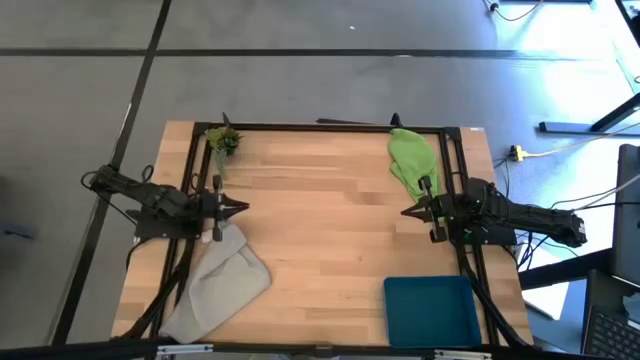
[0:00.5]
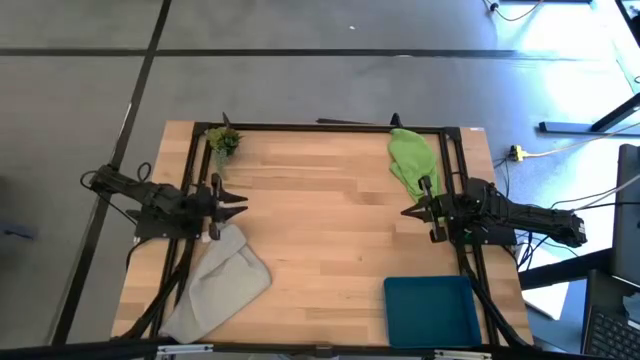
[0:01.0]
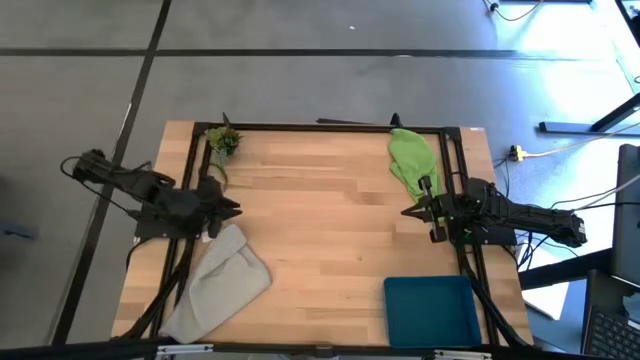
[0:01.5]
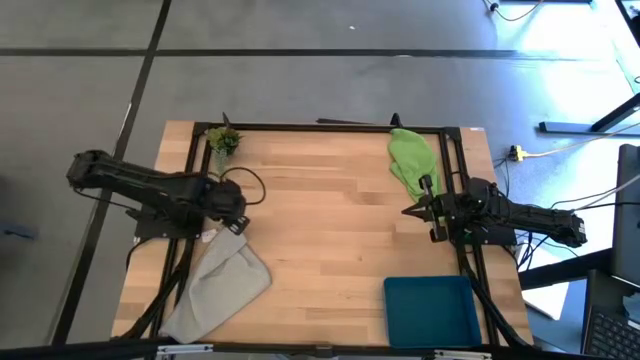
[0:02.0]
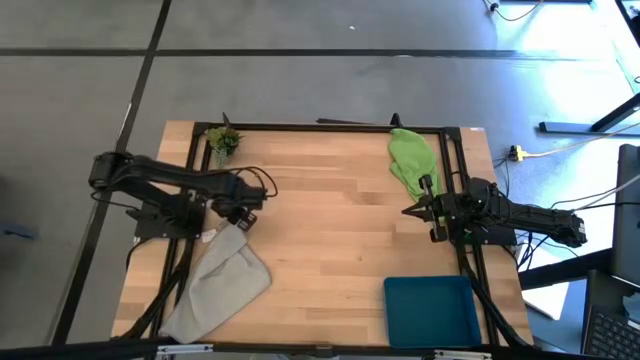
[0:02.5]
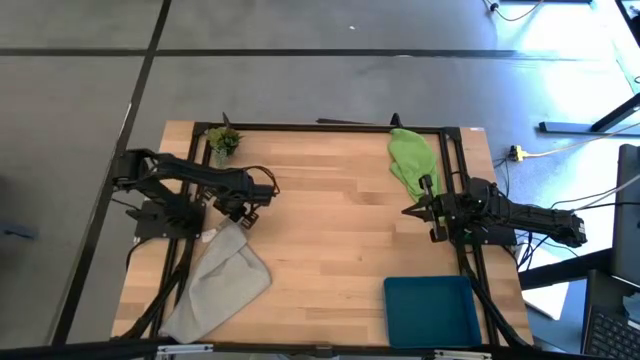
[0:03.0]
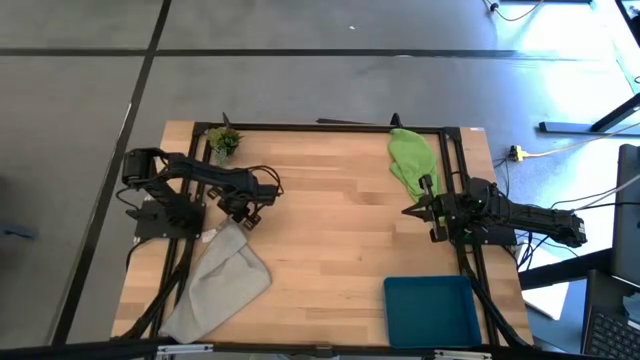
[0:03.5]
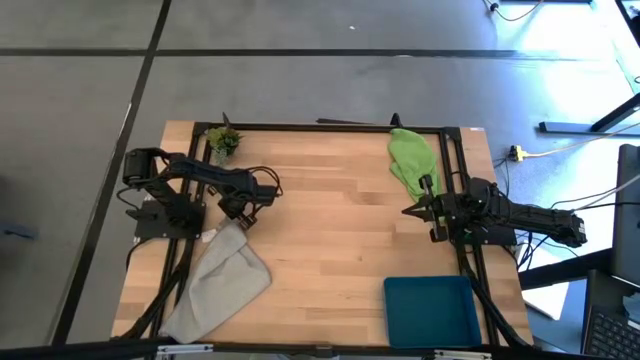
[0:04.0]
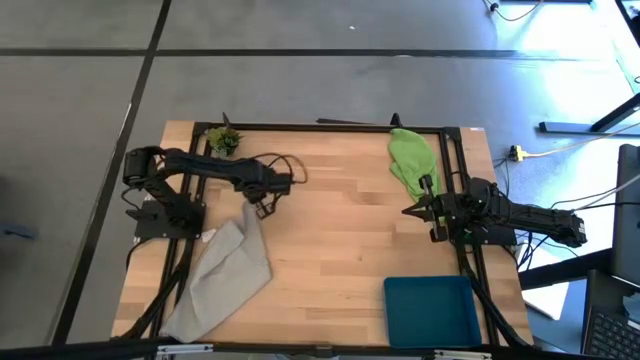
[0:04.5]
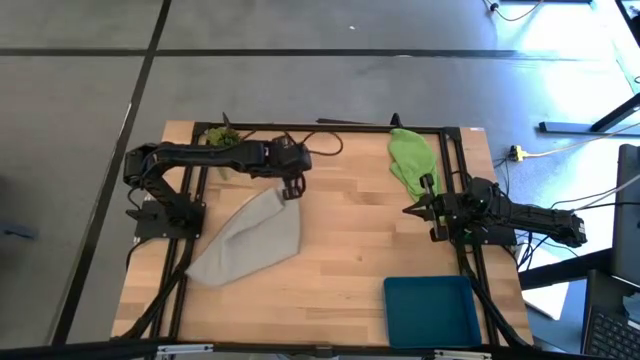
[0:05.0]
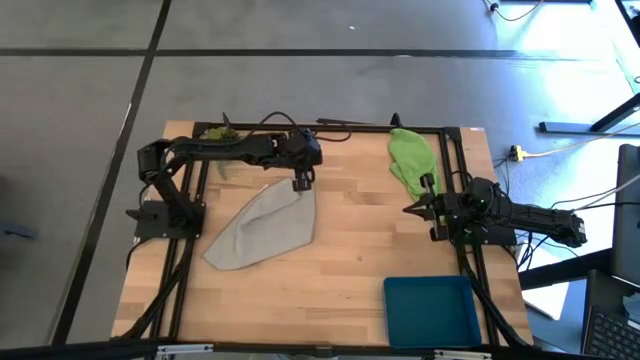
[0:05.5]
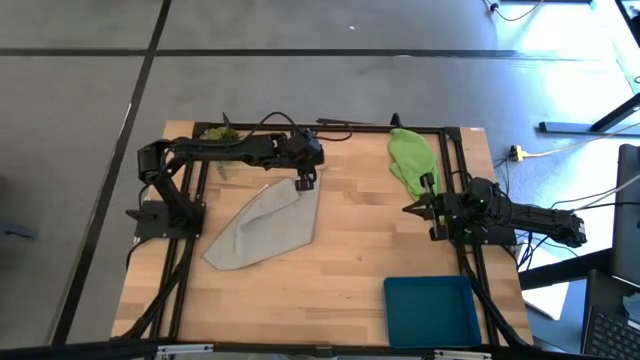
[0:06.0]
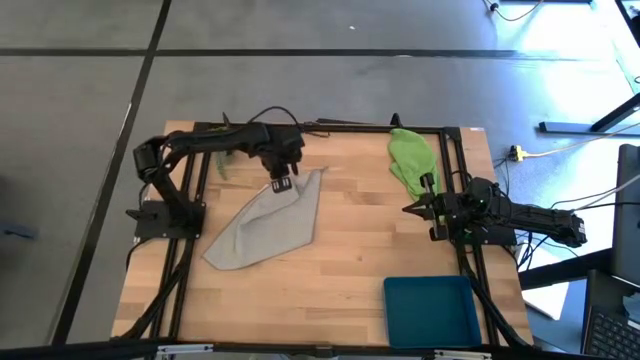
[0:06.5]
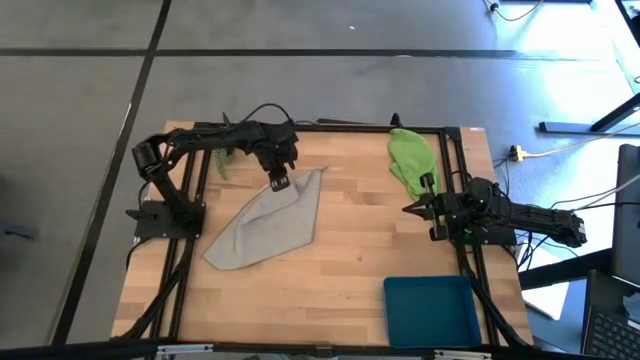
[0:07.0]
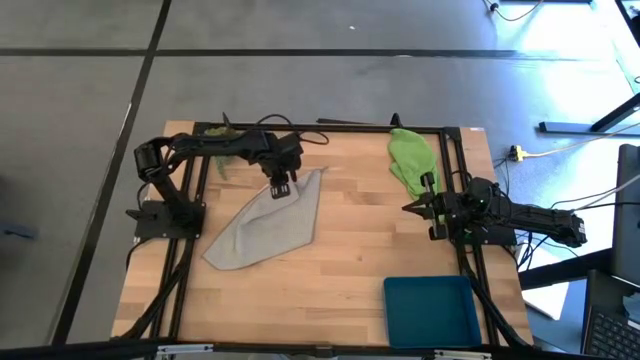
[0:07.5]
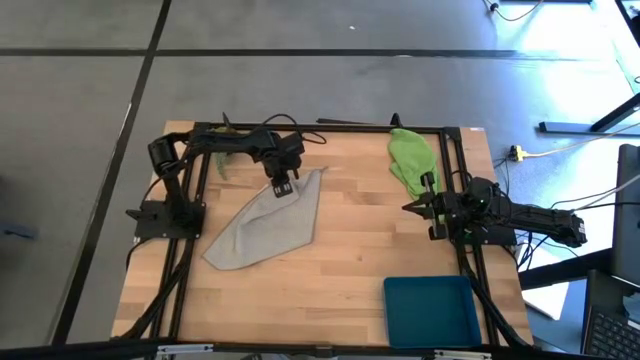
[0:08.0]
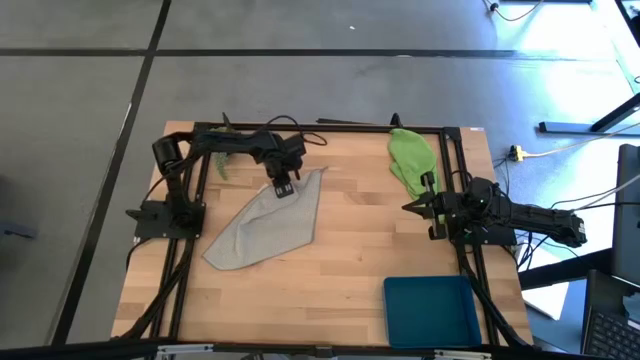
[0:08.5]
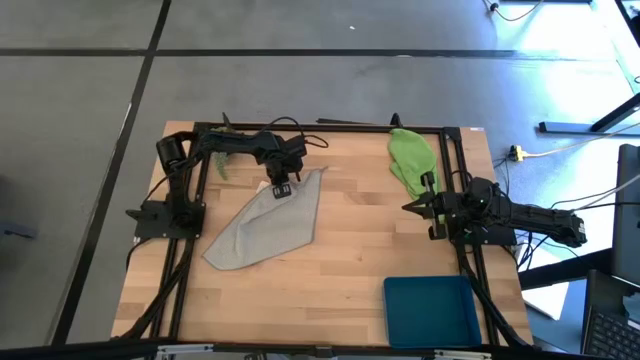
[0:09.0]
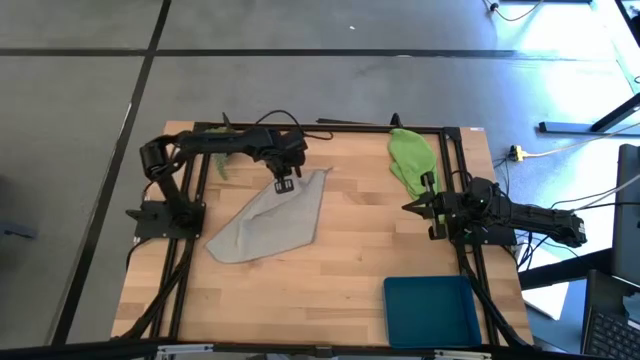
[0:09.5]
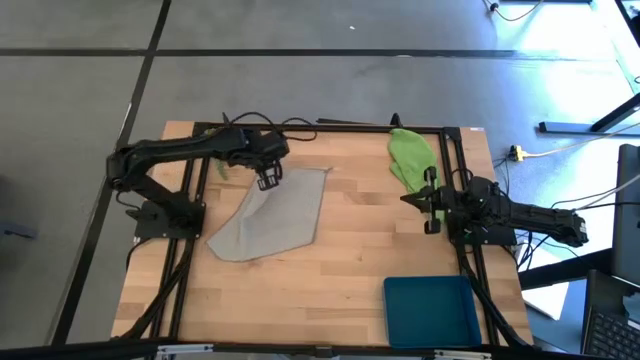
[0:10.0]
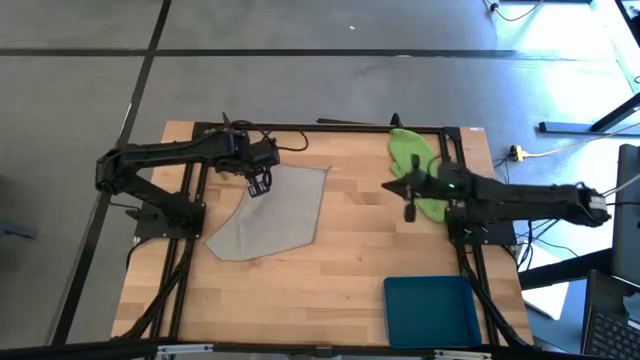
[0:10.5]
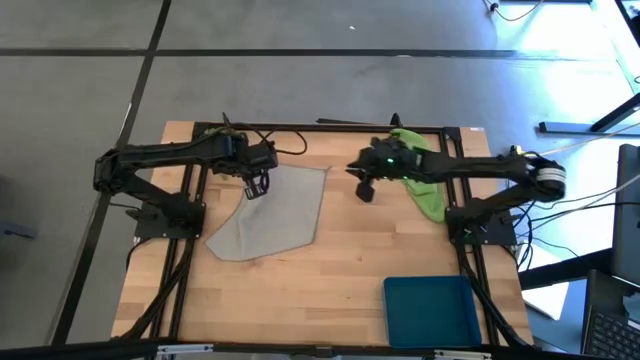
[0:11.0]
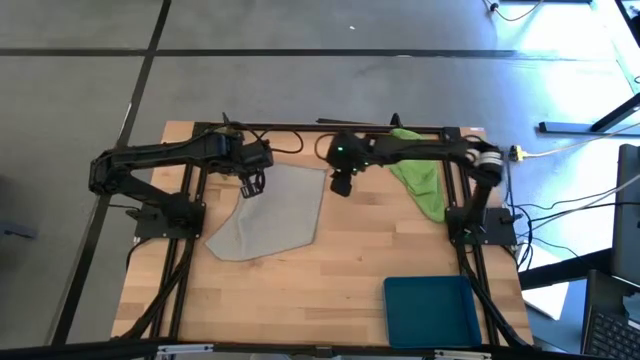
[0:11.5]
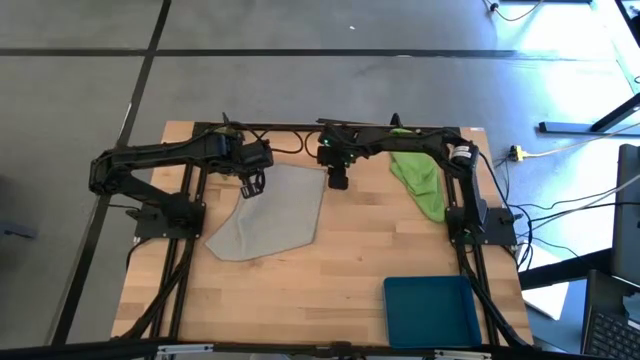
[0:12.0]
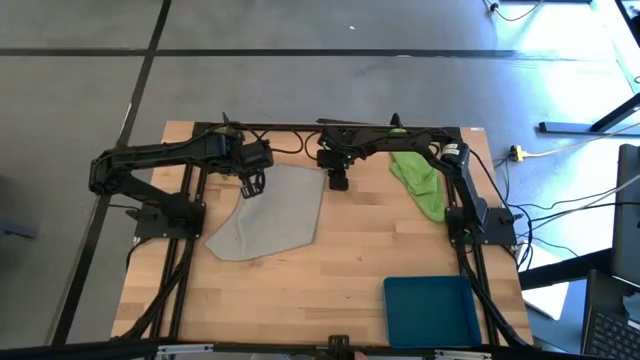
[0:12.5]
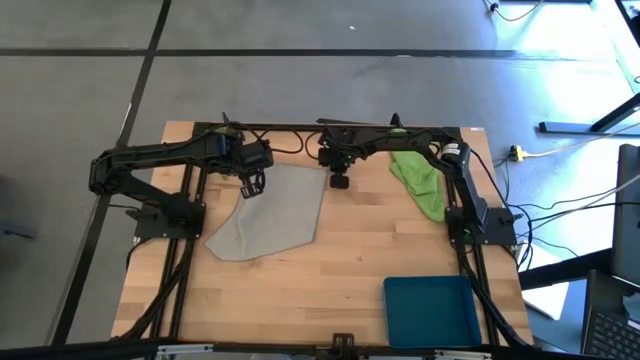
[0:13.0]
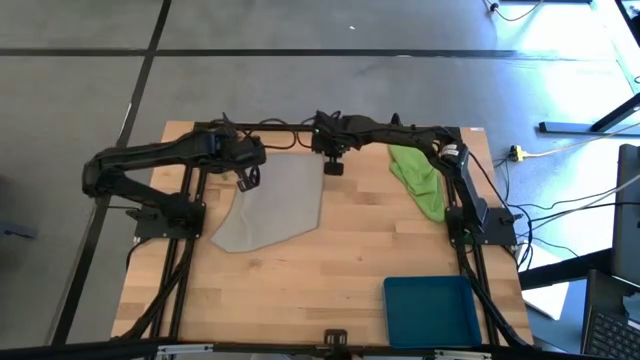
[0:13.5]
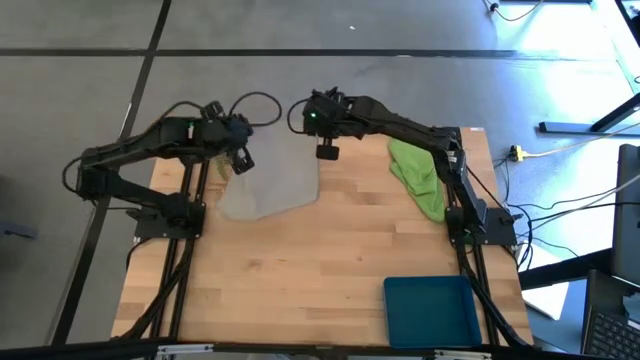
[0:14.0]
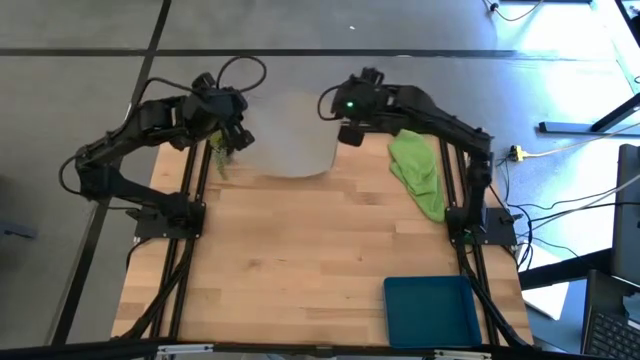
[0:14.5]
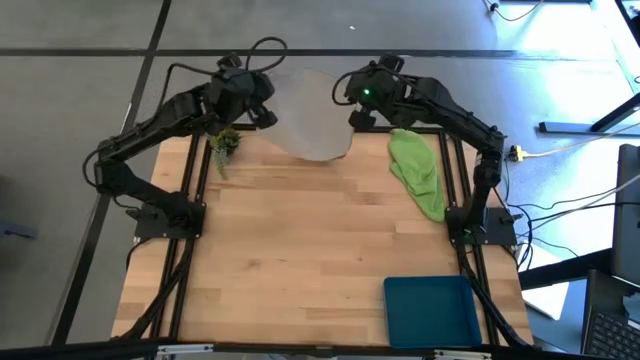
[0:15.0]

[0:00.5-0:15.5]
Task: Roll microfiber towels into tight, uniform cylinder then place into a basket
Fold the gray towel
